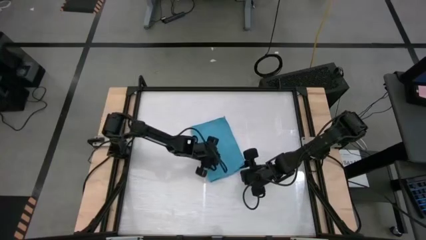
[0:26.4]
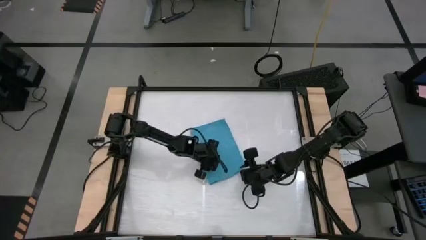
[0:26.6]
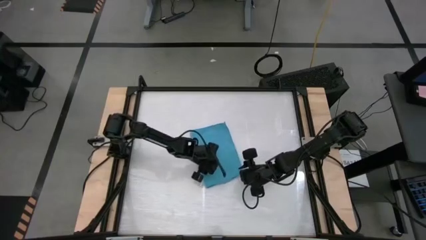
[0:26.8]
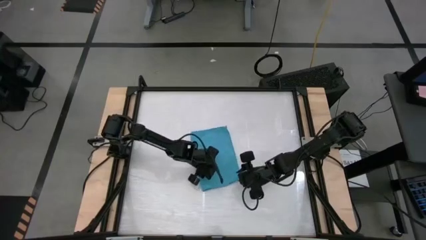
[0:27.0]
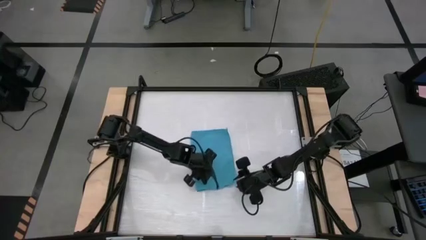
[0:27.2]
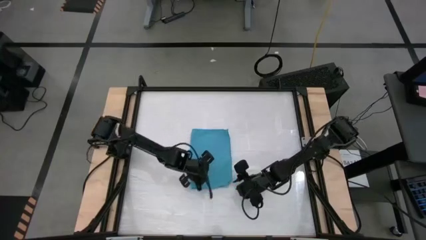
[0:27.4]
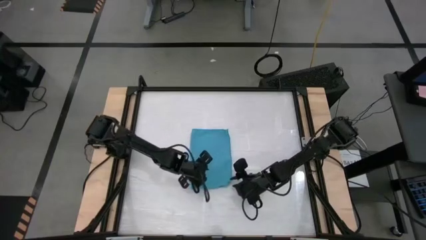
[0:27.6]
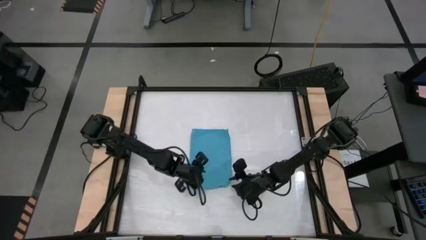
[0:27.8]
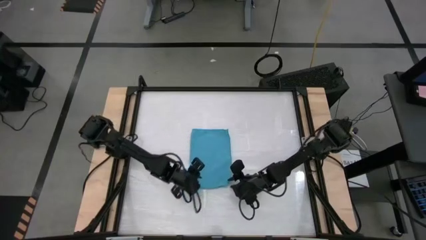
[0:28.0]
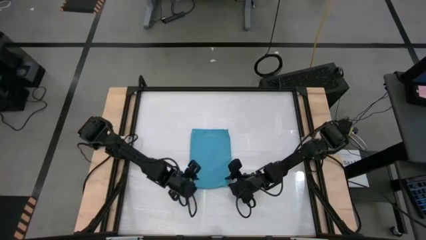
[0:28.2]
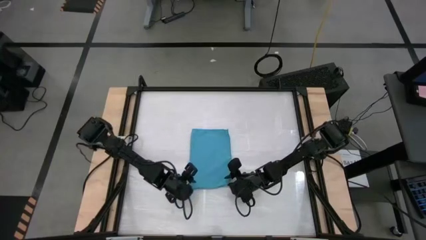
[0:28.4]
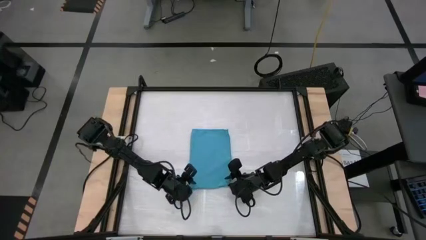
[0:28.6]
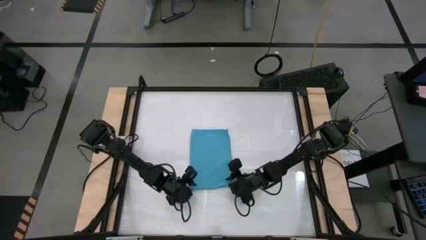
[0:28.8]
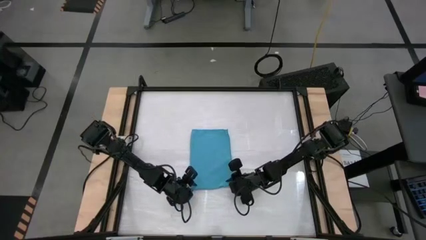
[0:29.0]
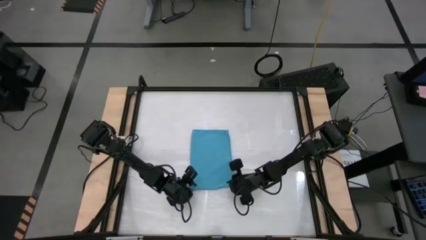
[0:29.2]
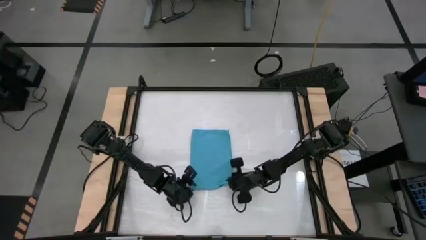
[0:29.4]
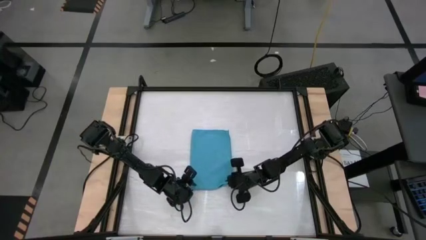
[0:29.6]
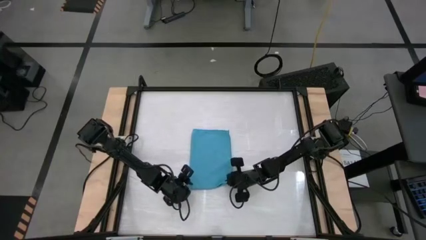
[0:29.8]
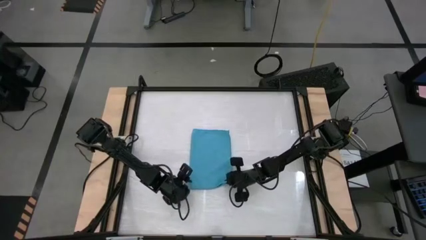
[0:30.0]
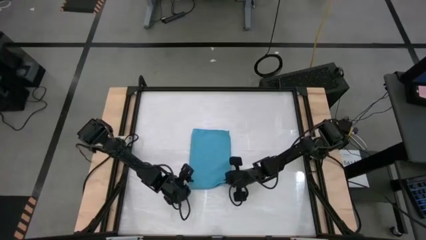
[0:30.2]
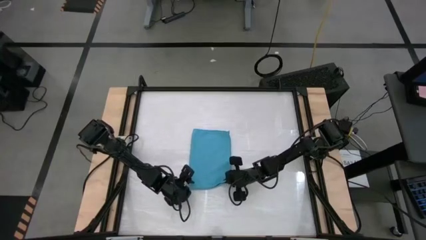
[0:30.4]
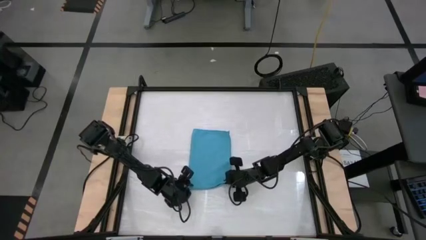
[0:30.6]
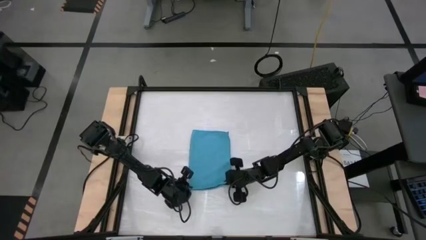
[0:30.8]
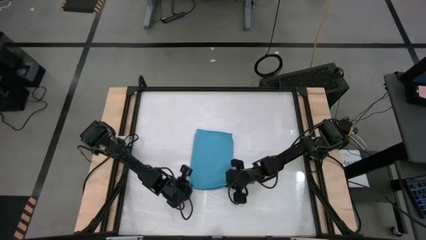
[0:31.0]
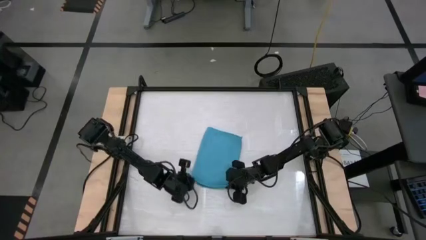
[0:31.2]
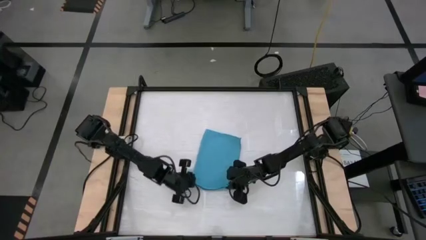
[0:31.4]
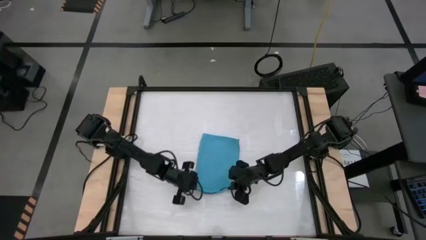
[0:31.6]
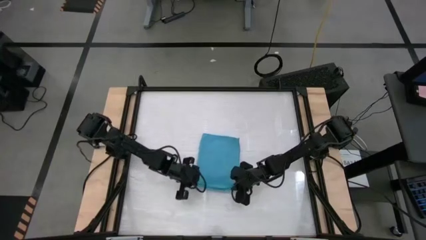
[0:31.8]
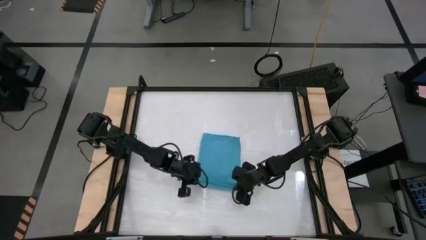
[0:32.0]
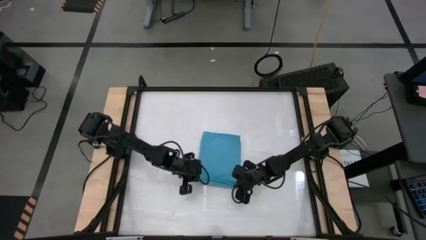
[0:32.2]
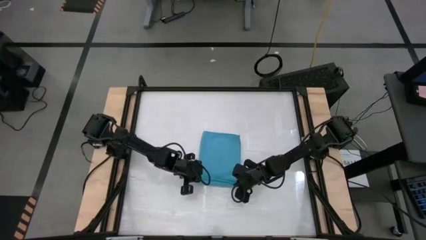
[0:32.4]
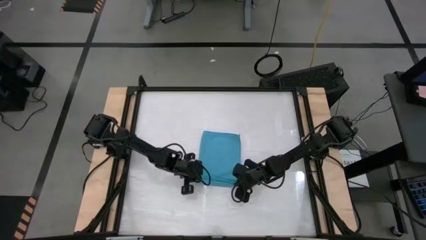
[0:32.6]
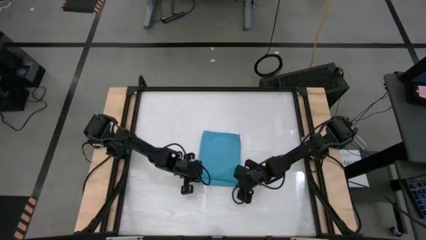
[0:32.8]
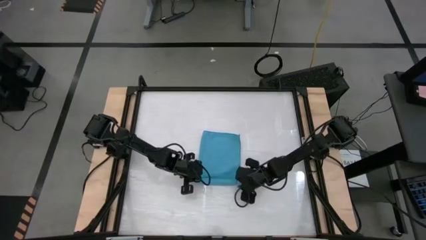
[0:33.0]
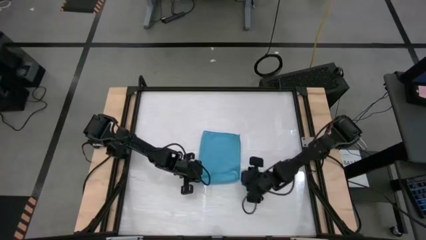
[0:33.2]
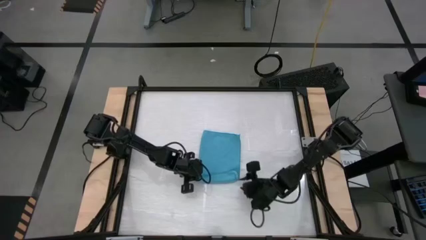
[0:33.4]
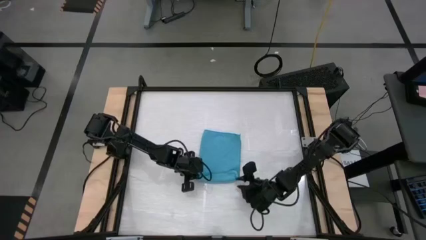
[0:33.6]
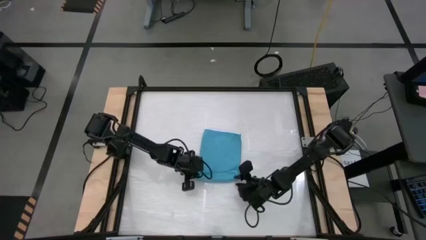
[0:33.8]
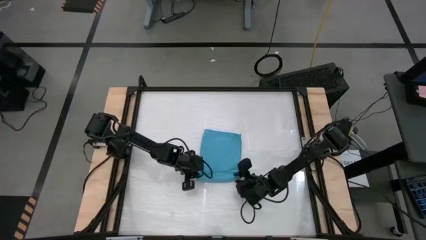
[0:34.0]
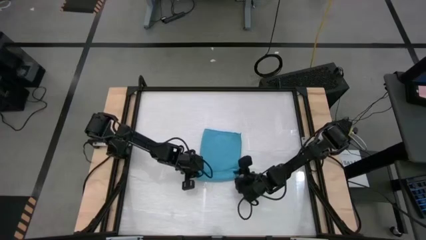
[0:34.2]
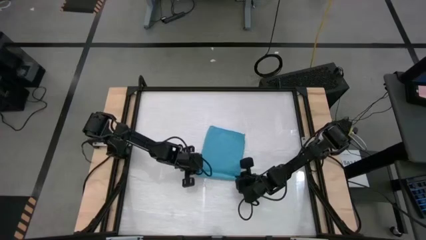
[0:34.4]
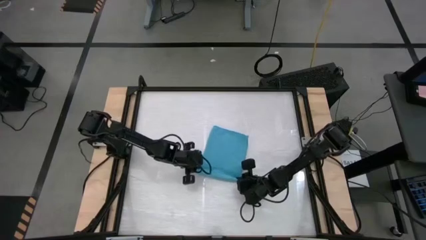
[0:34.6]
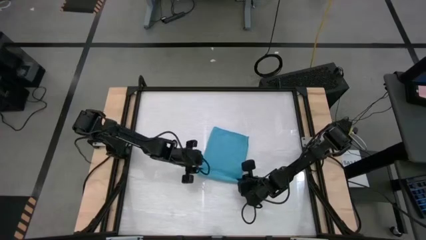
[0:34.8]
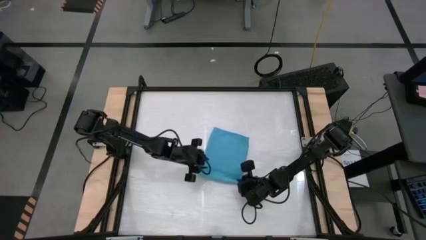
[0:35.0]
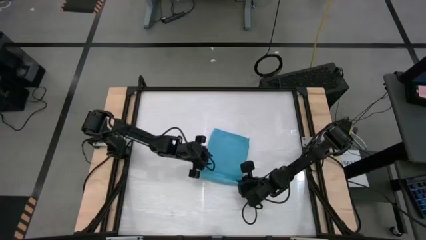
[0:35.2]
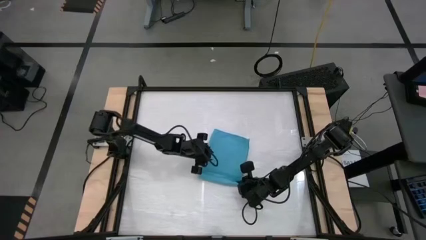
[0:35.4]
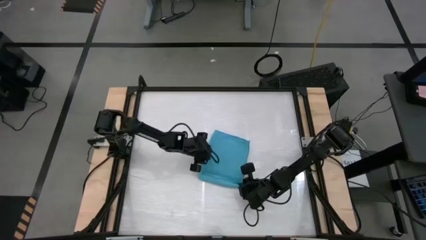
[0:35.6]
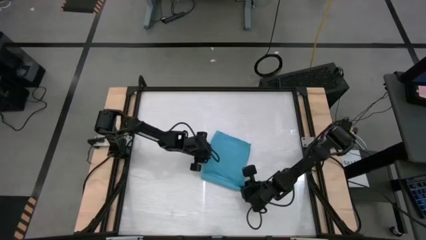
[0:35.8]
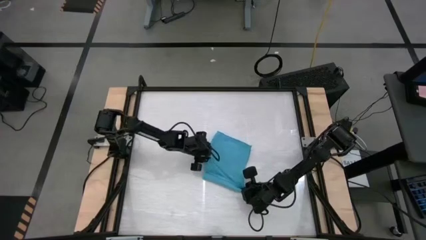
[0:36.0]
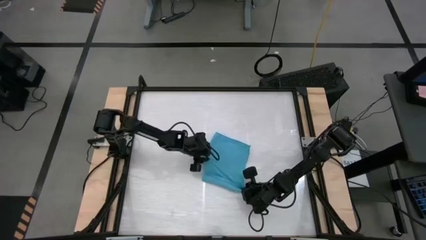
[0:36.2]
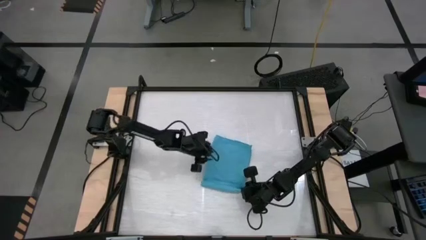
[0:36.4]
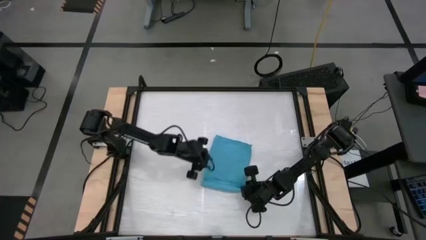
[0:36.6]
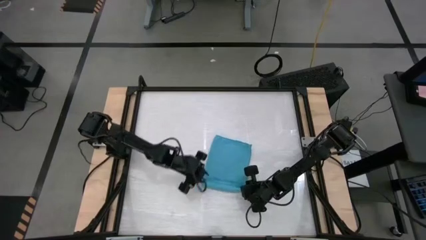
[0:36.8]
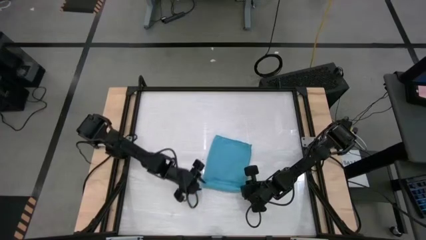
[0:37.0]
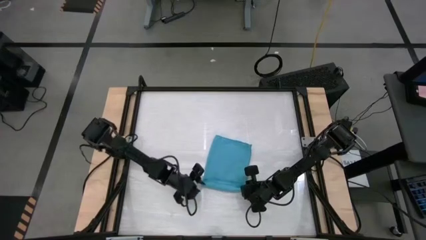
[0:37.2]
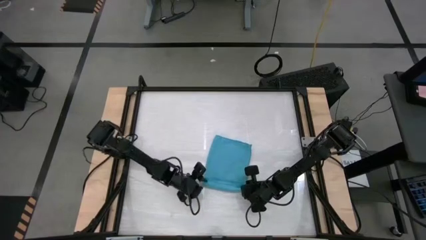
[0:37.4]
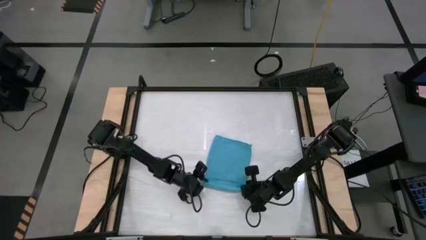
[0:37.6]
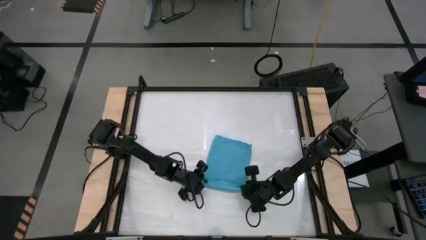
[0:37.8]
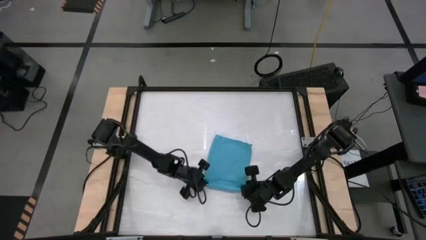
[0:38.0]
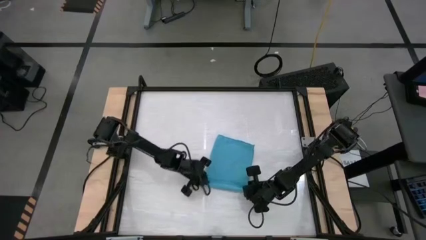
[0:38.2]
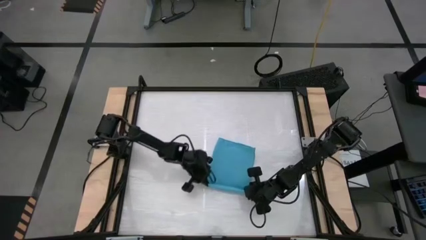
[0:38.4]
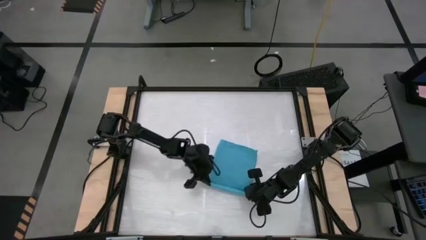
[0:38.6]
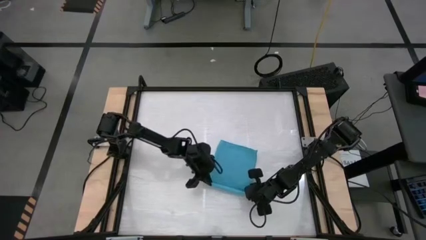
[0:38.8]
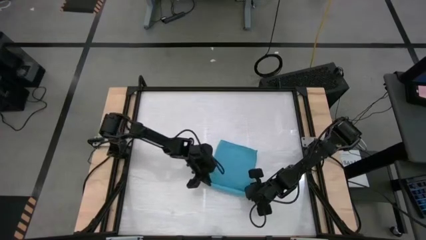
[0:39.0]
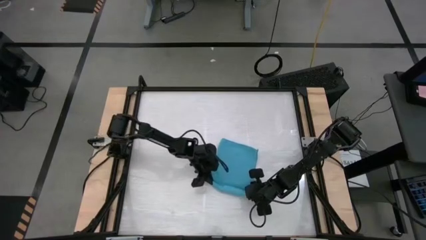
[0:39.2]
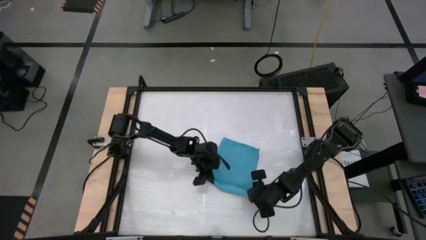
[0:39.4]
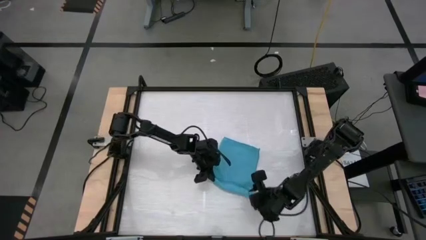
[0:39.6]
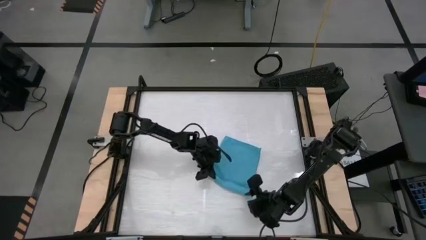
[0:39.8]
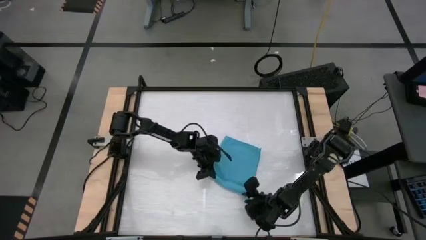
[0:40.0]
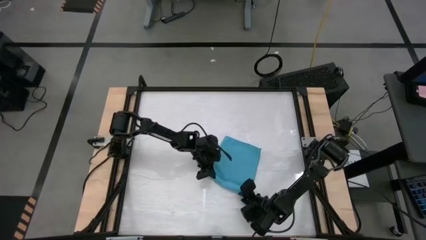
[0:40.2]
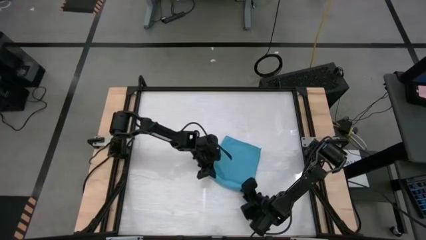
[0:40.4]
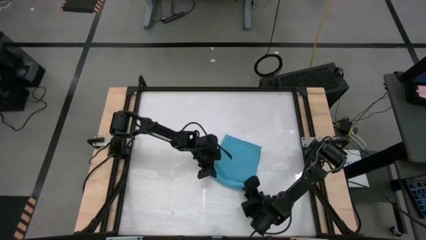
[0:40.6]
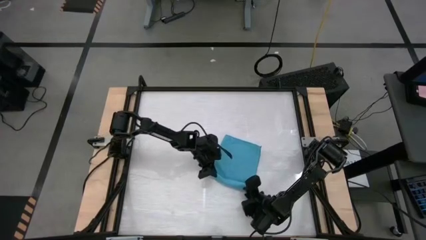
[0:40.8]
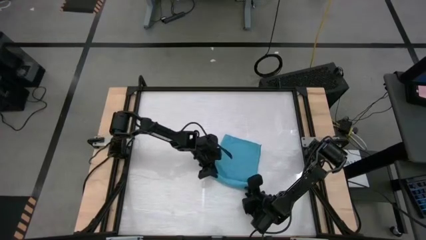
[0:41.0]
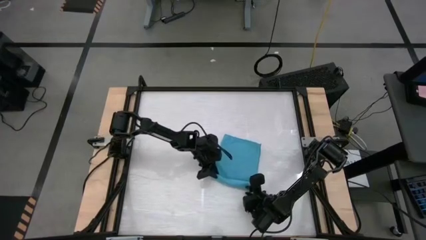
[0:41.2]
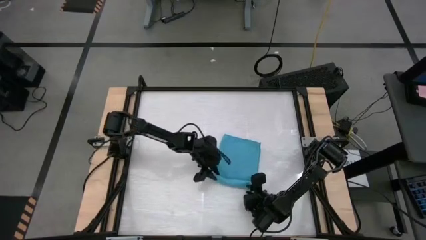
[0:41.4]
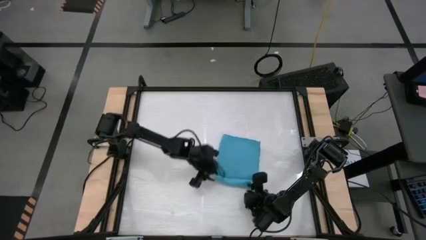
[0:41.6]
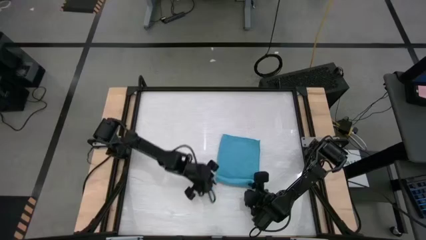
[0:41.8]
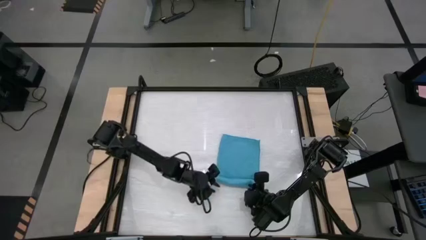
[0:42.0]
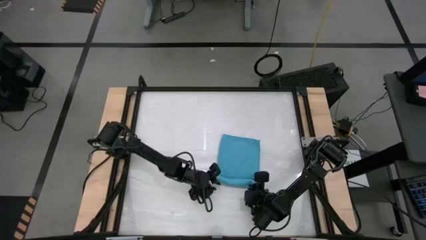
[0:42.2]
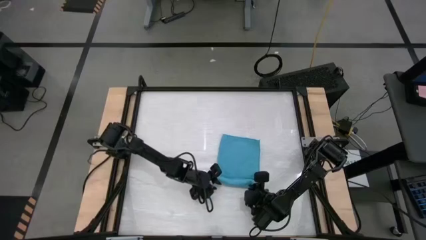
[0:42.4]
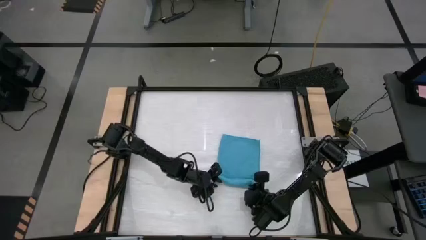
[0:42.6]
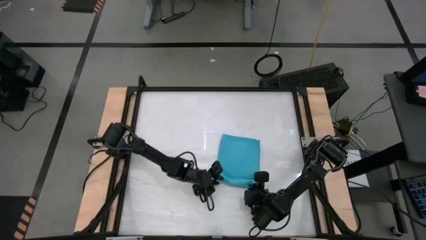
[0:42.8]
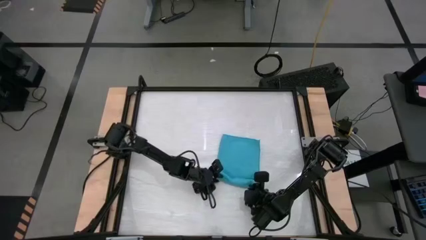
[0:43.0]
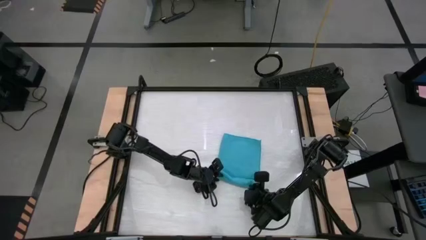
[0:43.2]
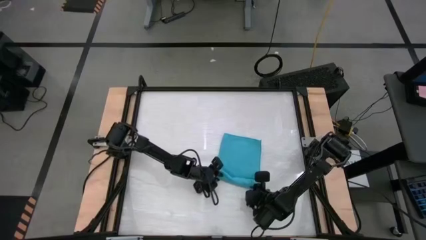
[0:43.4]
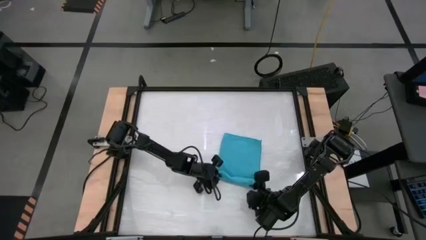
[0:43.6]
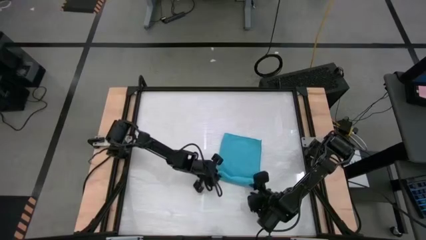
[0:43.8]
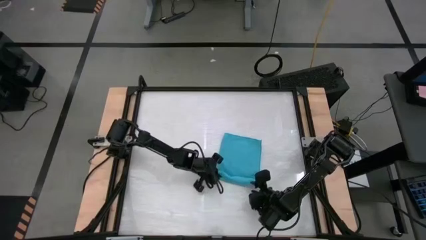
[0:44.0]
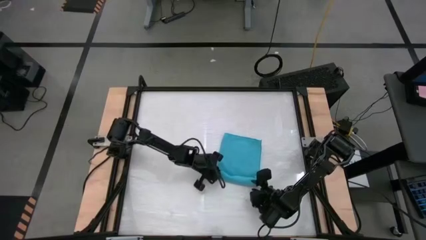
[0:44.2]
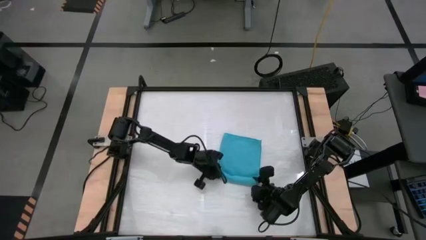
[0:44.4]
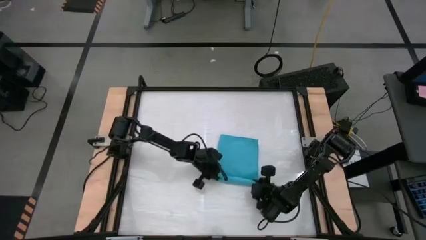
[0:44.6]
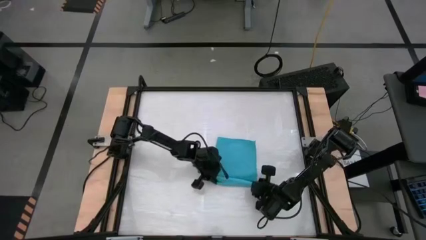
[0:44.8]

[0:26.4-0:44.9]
Task: Roll towel
Roll the blue towel
